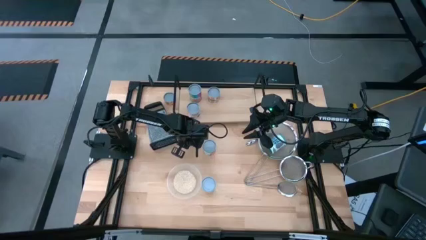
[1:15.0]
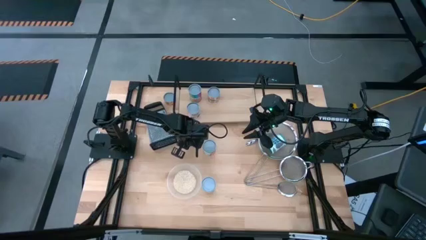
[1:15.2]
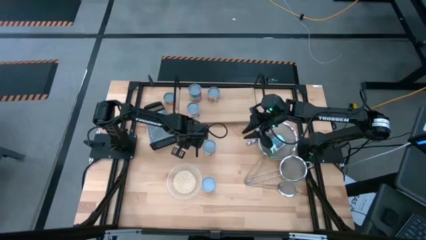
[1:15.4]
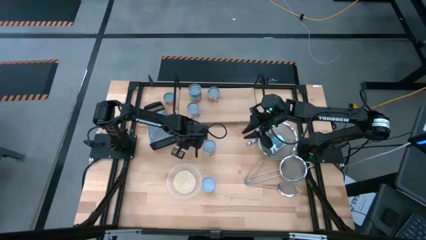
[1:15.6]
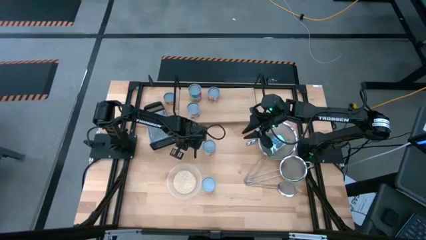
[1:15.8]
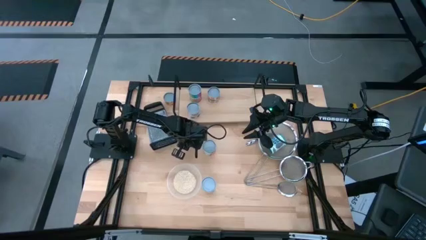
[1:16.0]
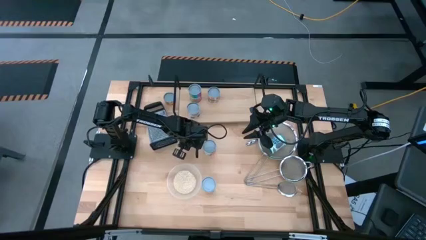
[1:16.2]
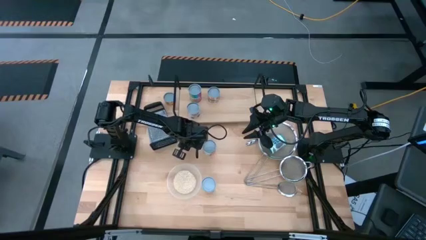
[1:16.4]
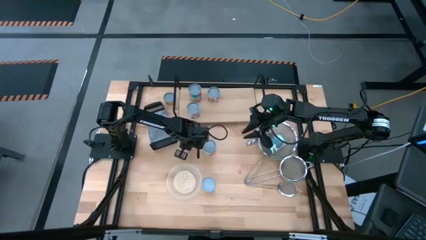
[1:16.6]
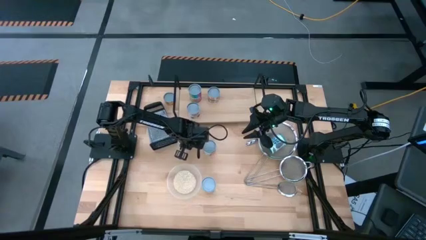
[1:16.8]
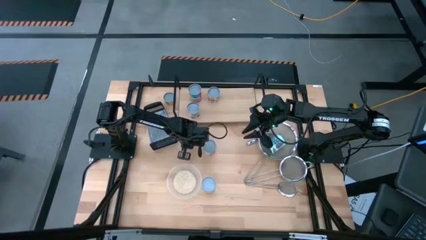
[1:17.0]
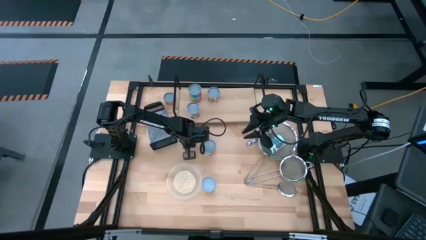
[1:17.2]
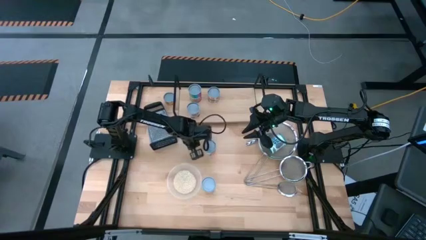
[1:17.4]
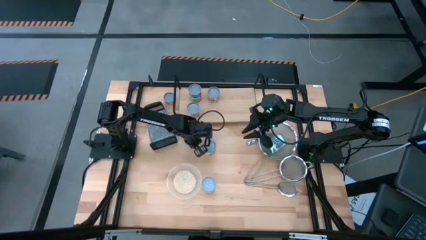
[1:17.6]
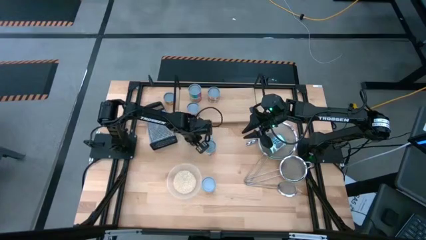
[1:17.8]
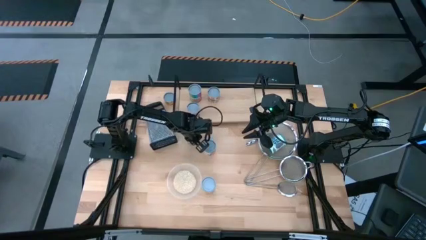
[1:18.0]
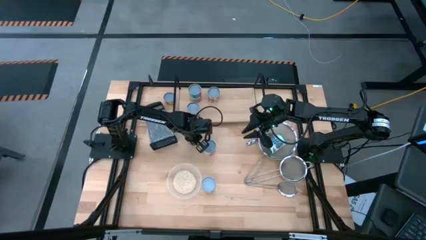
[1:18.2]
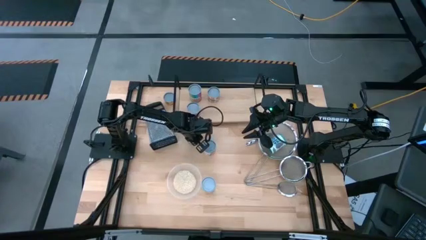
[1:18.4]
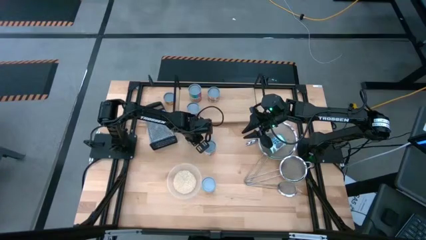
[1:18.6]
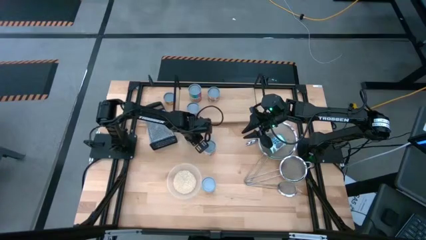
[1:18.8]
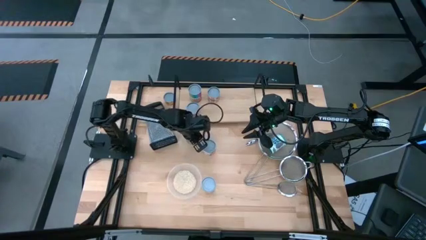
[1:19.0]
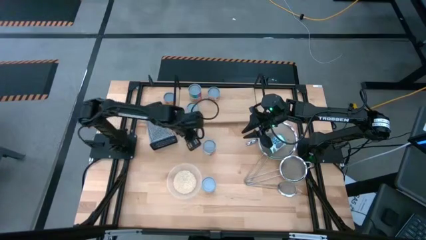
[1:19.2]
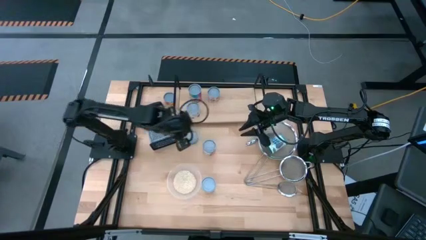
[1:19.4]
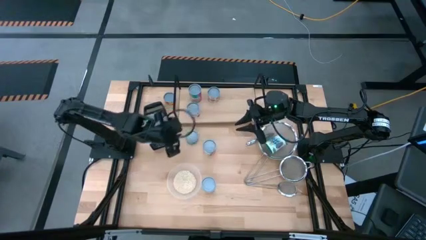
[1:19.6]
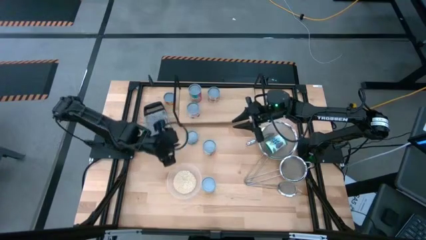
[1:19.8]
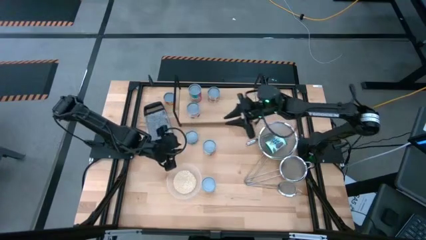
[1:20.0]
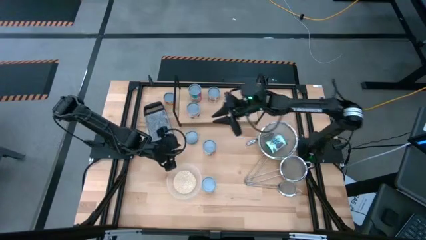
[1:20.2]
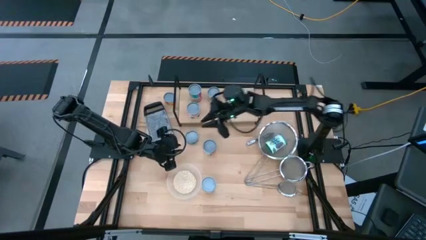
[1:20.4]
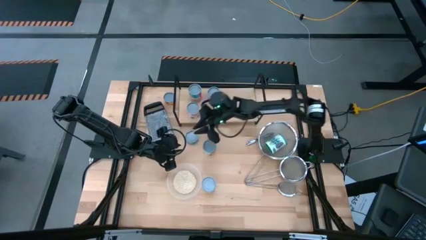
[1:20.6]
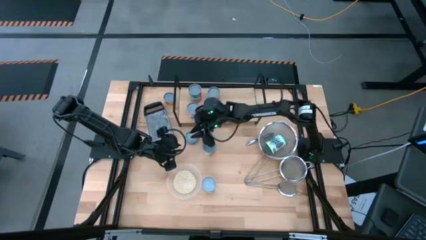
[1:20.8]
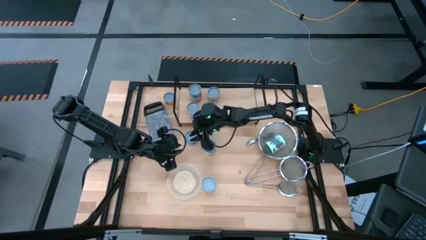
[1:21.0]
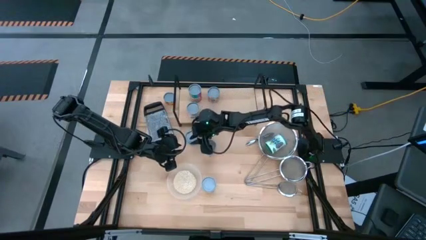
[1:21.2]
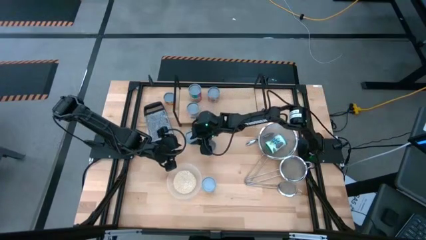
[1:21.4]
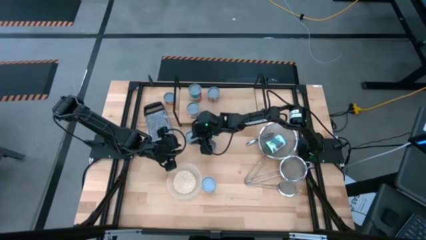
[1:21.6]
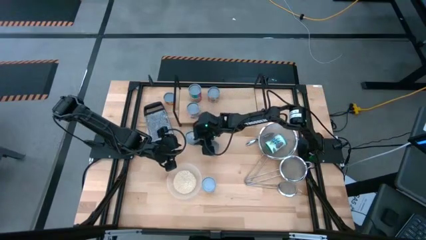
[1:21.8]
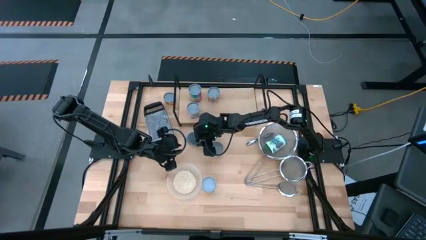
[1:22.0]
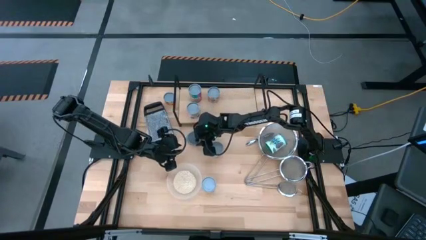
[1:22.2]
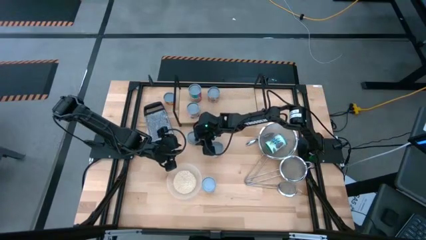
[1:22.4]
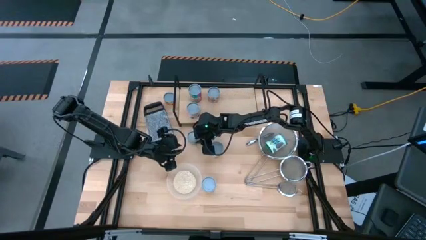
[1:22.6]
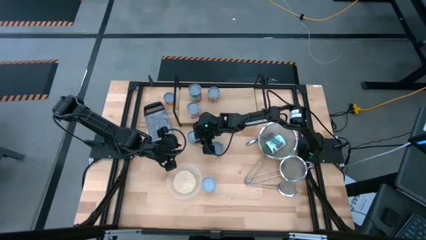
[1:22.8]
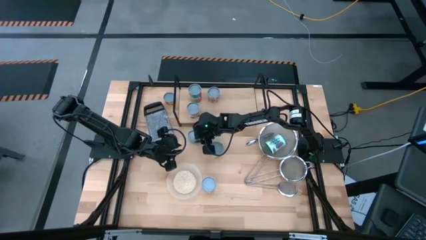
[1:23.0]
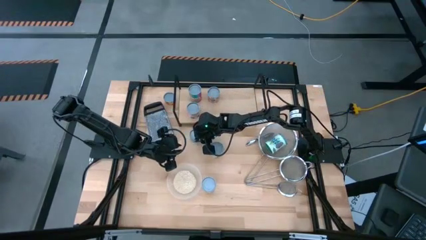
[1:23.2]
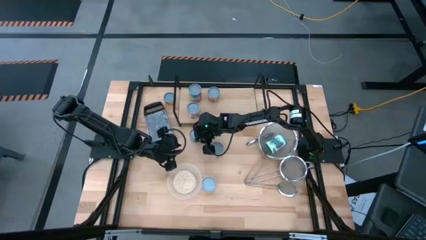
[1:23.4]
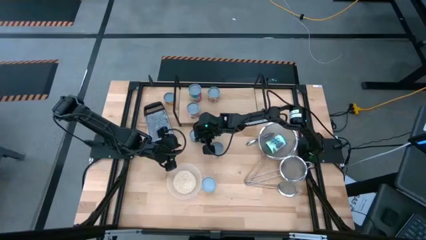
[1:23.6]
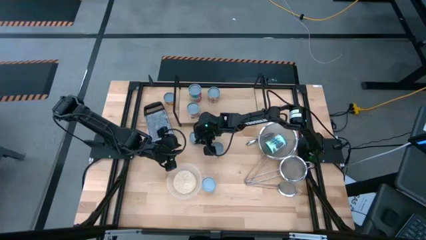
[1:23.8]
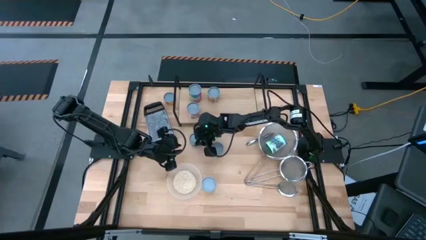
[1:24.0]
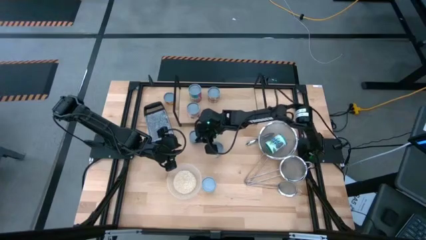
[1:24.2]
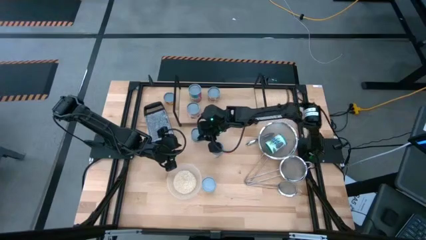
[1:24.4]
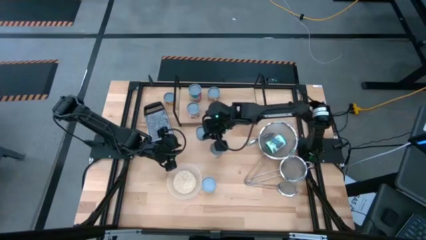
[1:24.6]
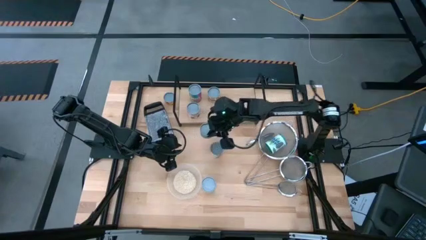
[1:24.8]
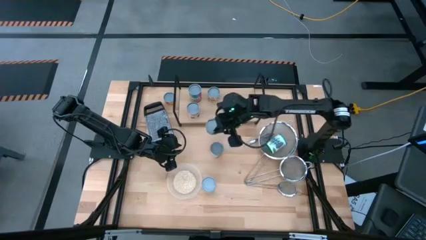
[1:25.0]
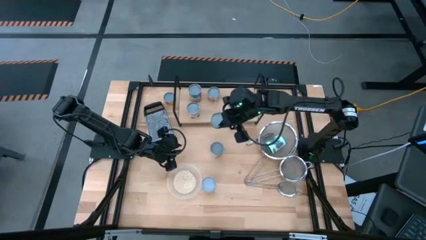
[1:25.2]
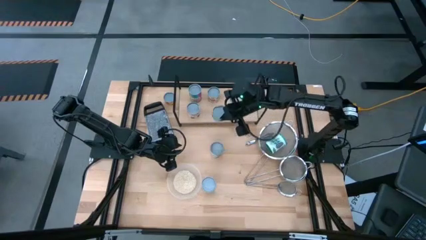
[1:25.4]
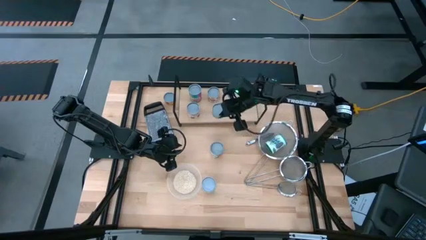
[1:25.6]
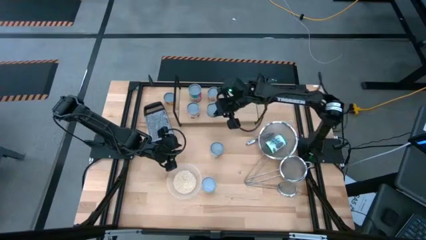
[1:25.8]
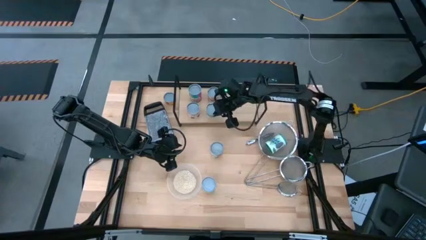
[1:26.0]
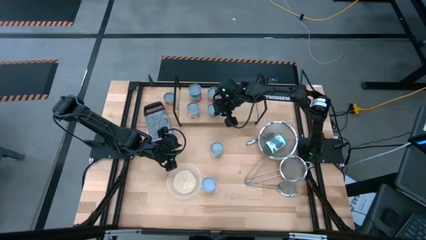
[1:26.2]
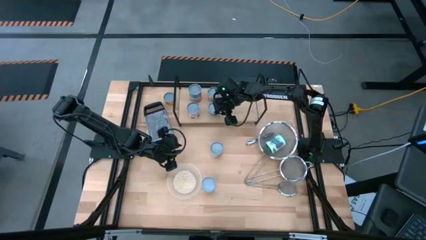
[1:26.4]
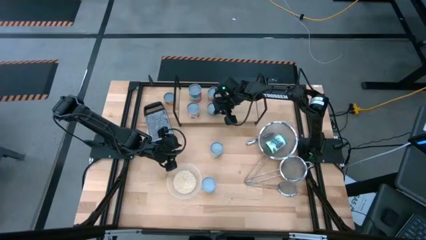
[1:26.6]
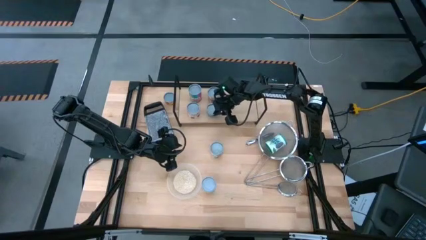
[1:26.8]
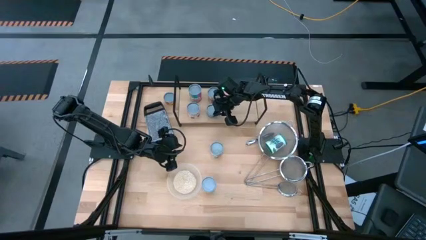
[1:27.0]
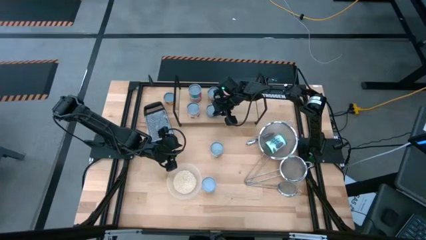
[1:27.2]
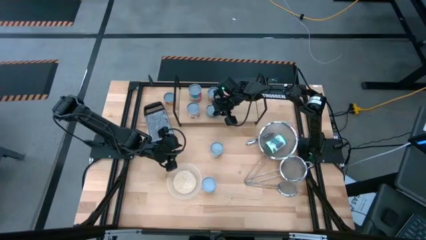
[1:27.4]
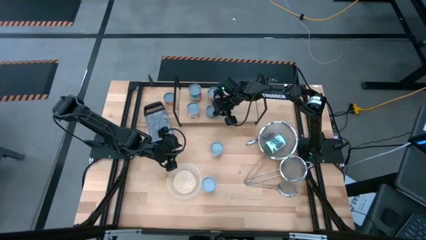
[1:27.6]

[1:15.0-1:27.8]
Task: Pick and place cans onto a shelf
Put the blue tuna fish can on the shelf
